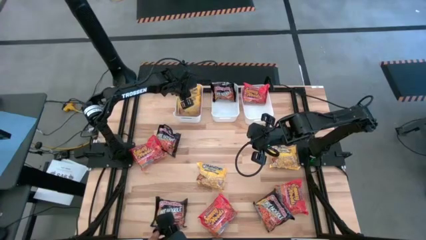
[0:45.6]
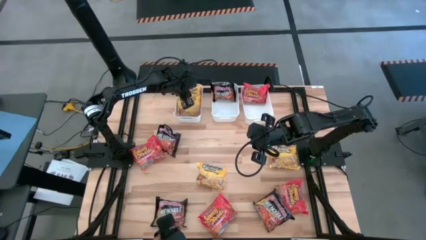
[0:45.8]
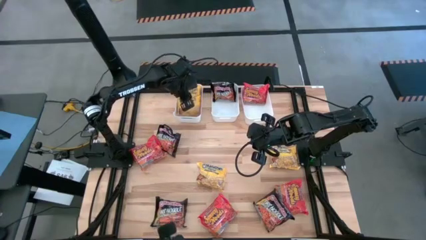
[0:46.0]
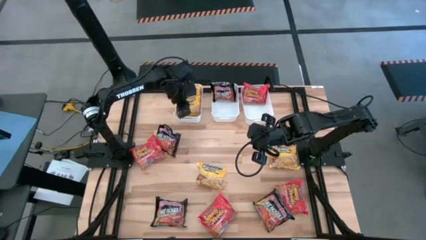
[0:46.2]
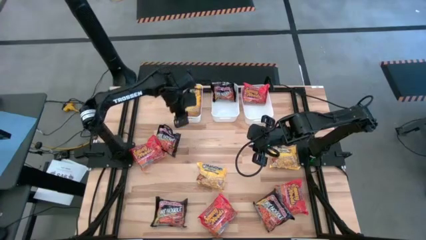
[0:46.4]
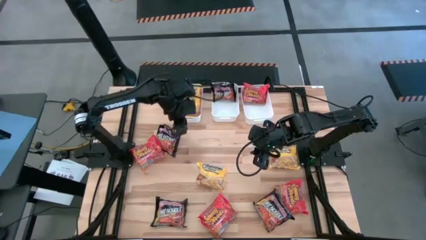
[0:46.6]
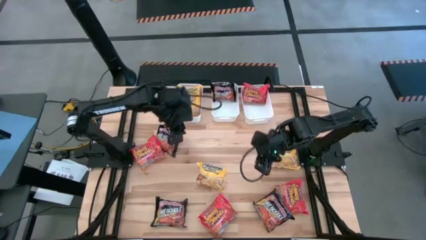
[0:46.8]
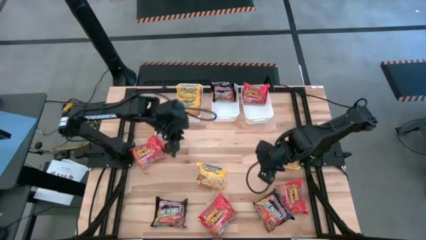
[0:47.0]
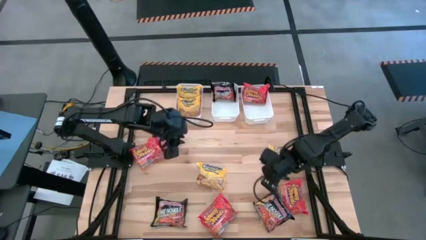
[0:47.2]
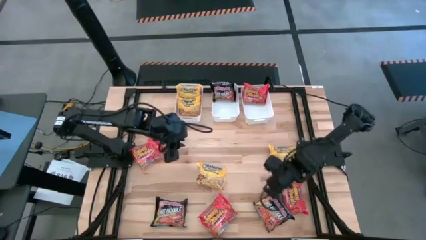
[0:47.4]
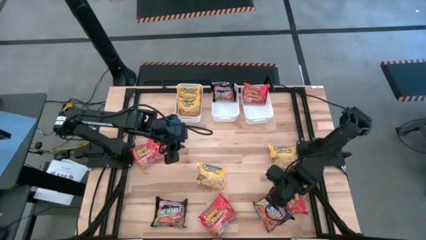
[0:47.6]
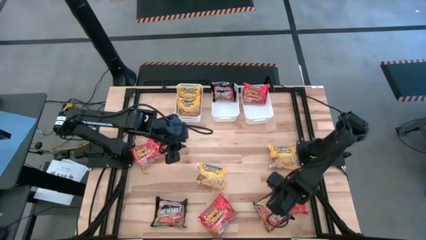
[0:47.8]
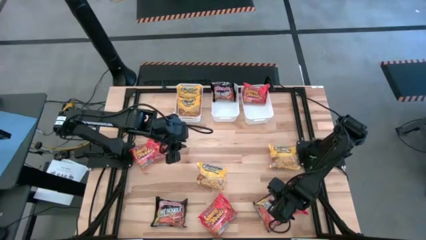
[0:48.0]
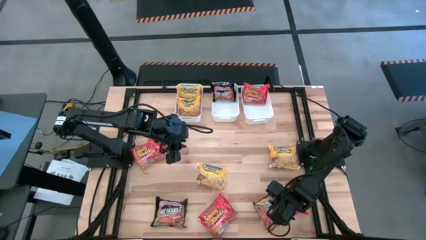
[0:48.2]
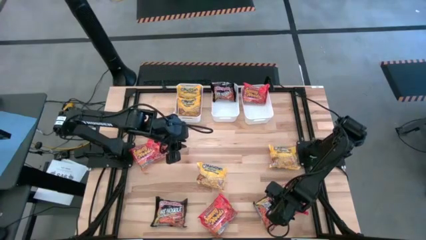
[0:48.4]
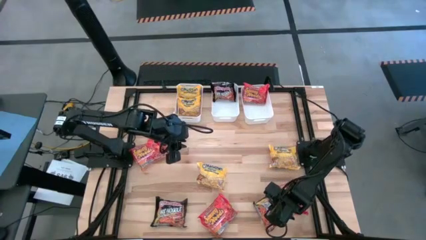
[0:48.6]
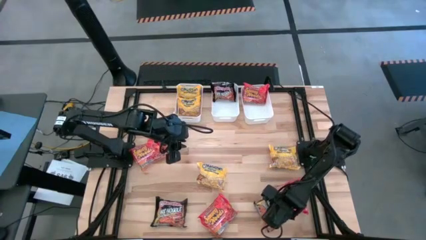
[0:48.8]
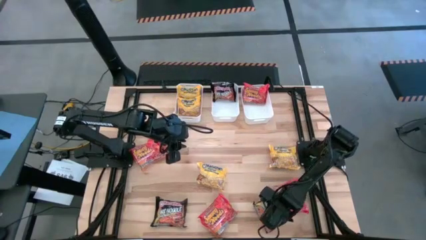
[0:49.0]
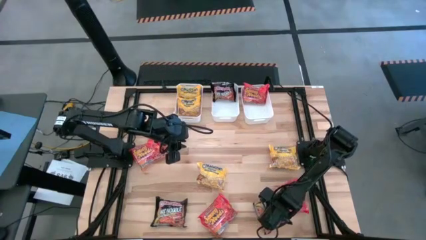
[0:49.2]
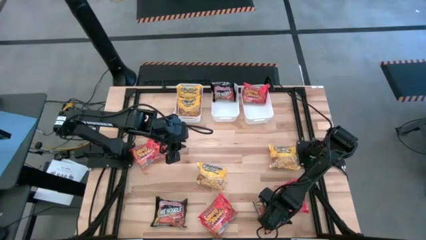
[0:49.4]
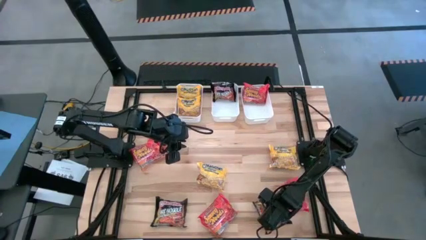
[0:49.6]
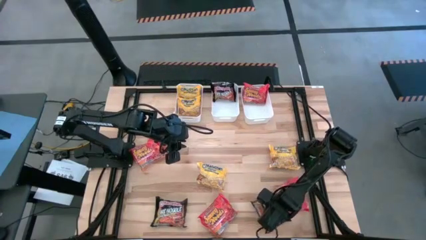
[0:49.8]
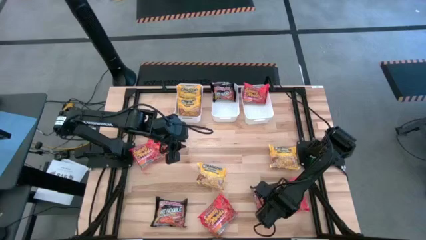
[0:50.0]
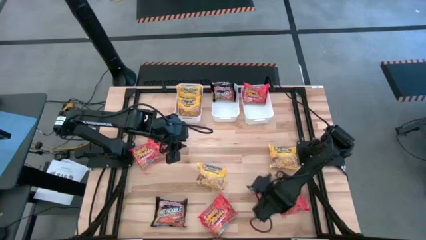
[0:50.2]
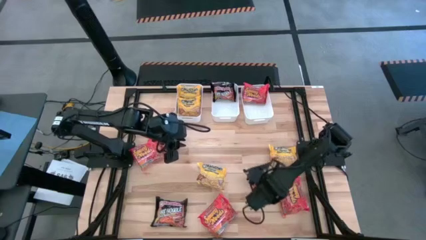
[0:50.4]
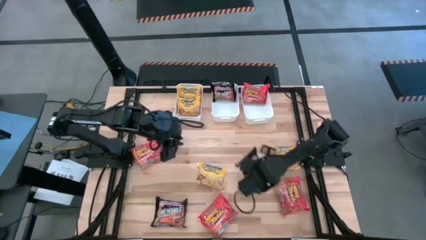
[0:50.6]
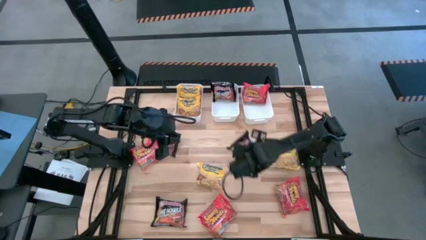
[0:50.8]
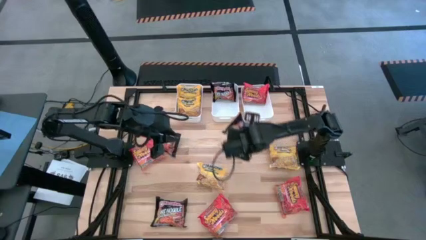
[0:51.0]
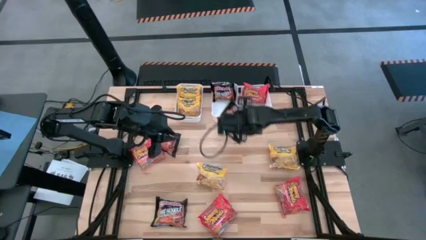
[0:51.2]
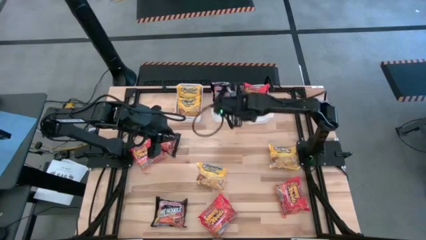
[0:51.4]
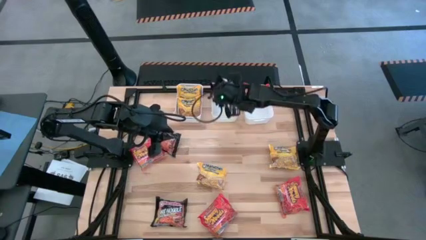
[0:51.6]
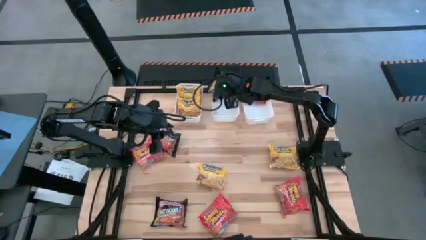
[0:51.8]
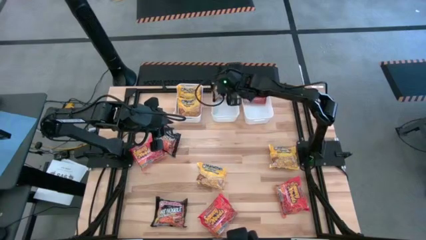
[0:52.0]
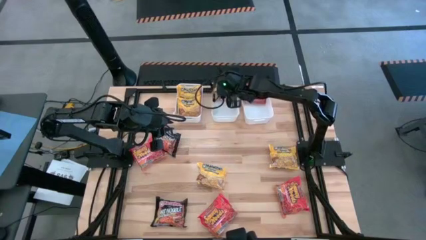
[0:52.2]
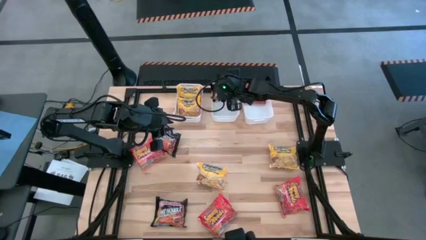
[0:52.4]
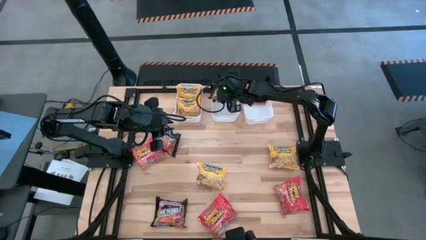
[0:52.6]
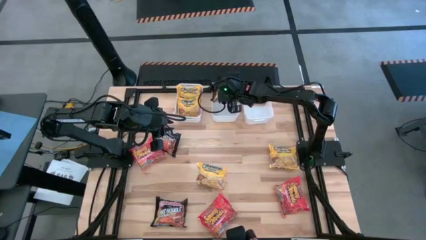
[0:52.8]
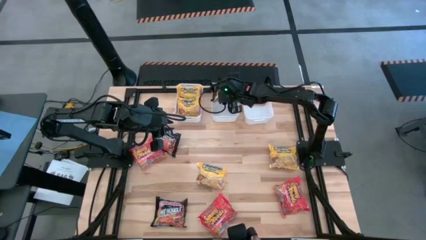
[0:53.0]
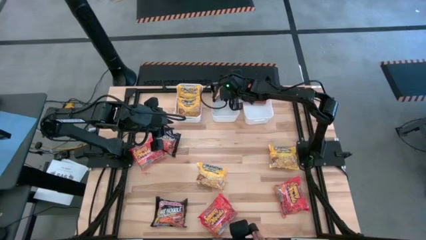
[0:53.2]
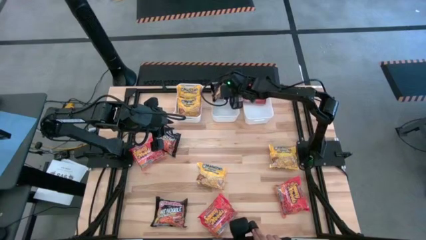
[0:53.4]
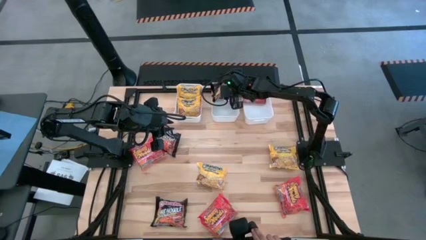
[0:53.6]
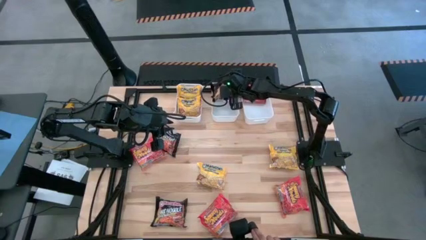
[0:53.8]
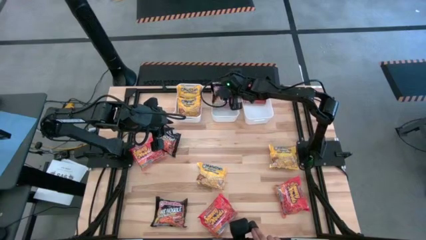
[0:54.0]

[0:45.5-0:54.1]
Task: Sort Maruchan noodles
Put the black noodle pack into the middle white bin

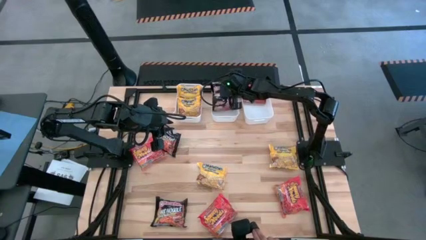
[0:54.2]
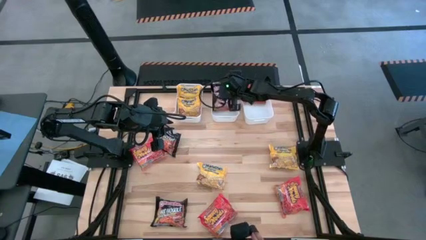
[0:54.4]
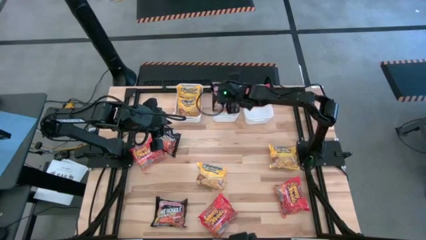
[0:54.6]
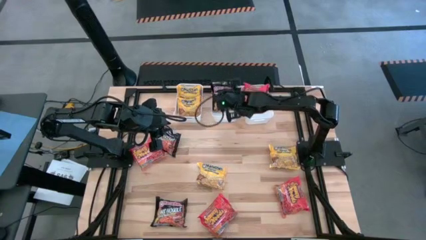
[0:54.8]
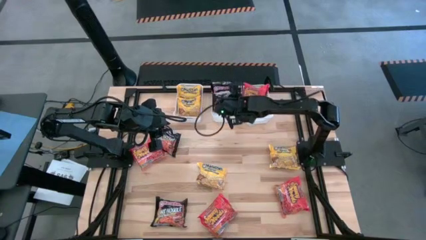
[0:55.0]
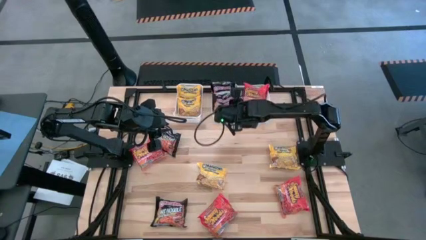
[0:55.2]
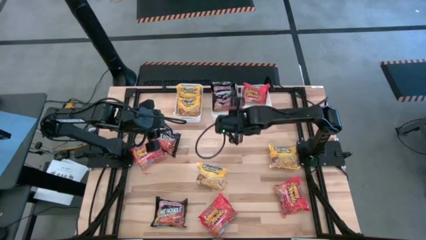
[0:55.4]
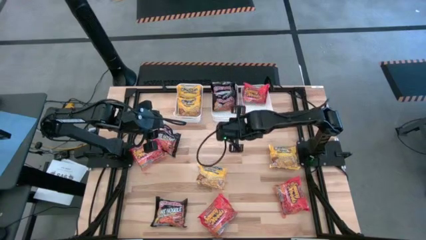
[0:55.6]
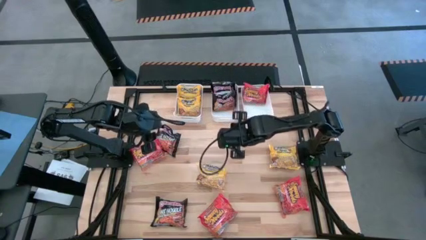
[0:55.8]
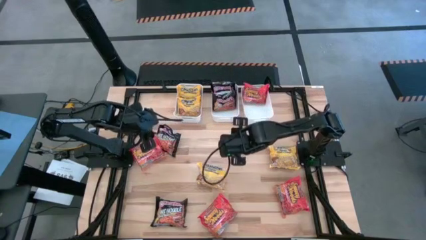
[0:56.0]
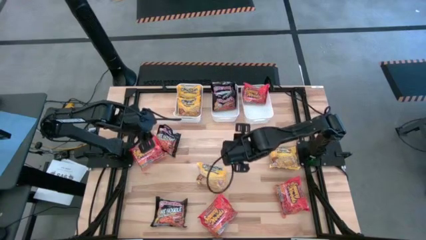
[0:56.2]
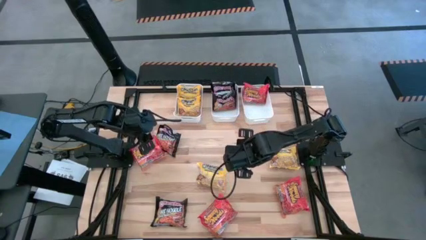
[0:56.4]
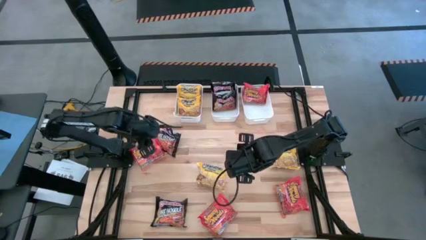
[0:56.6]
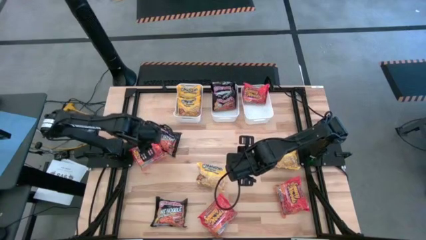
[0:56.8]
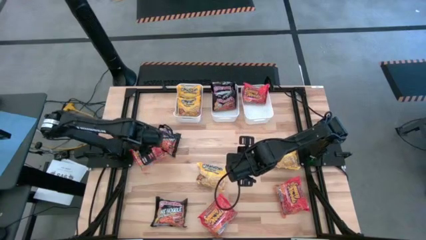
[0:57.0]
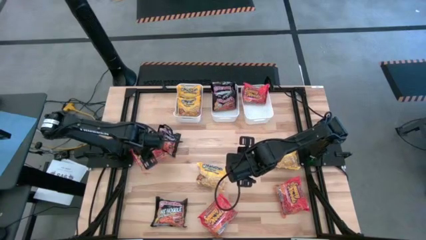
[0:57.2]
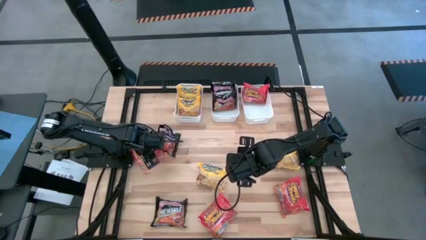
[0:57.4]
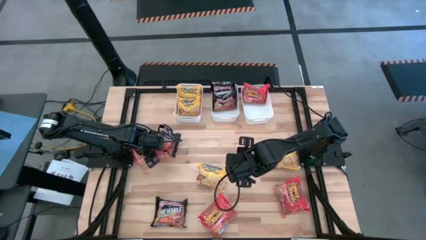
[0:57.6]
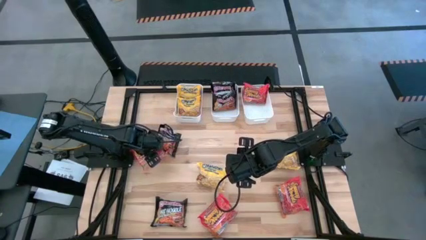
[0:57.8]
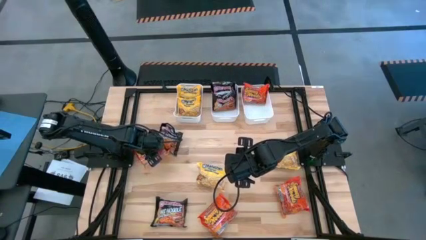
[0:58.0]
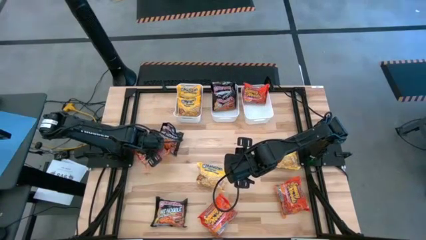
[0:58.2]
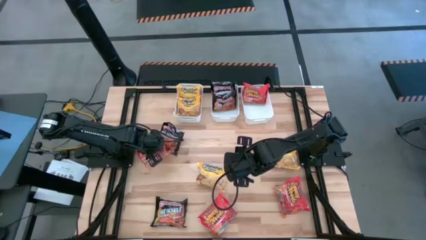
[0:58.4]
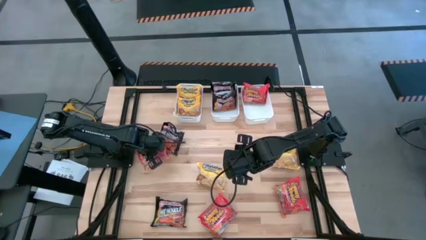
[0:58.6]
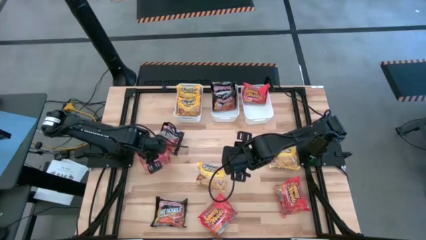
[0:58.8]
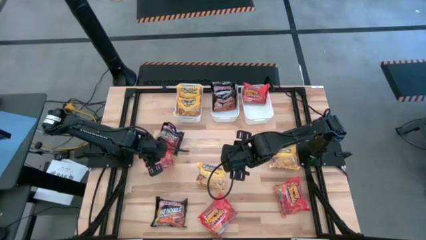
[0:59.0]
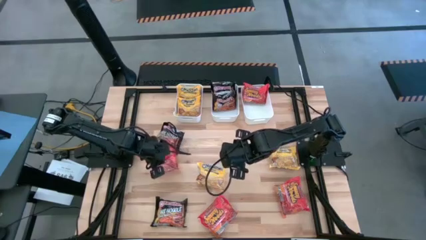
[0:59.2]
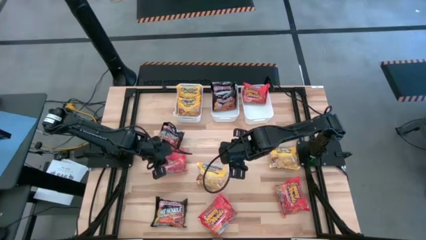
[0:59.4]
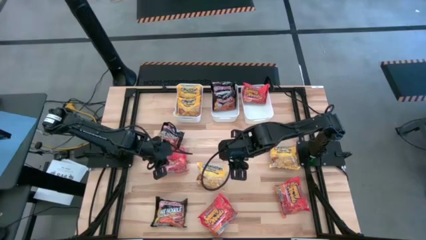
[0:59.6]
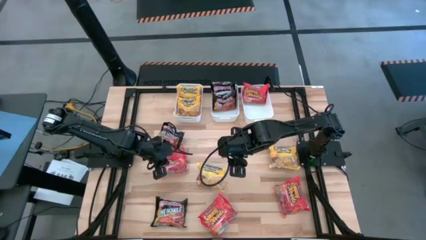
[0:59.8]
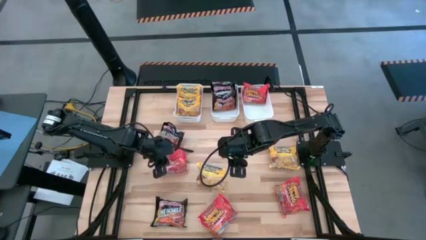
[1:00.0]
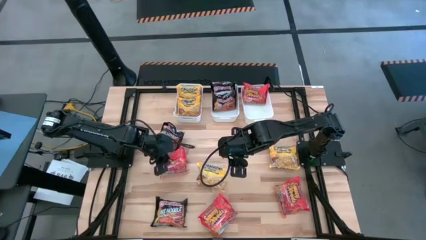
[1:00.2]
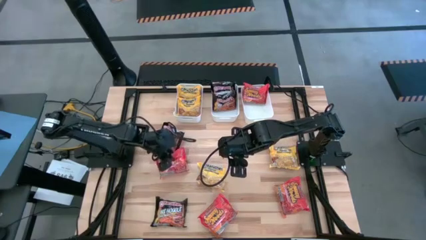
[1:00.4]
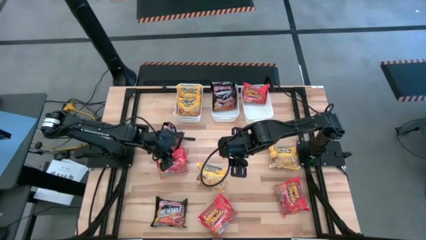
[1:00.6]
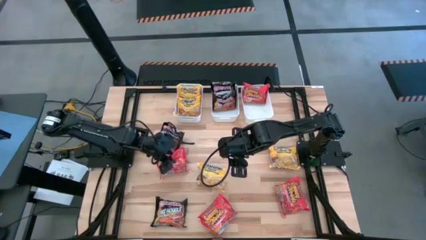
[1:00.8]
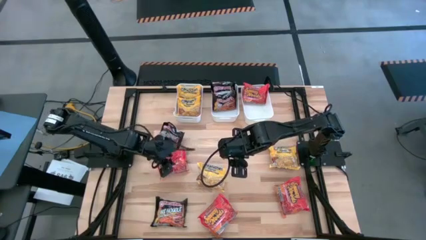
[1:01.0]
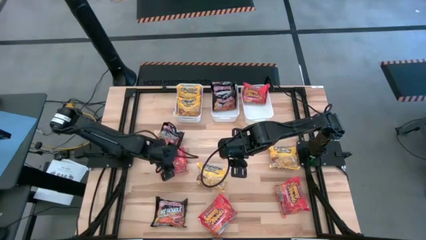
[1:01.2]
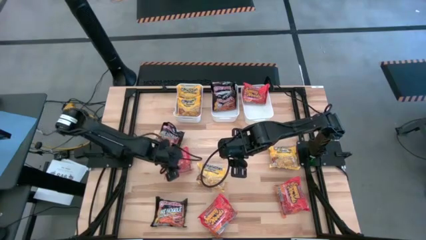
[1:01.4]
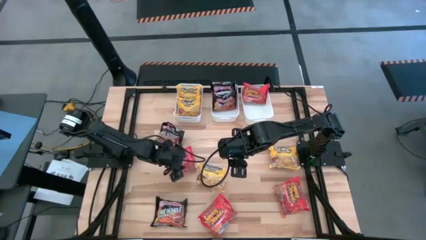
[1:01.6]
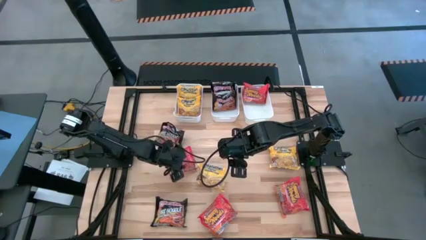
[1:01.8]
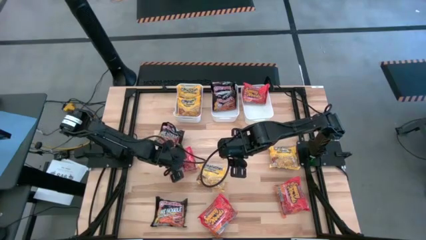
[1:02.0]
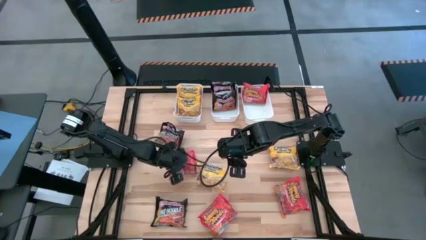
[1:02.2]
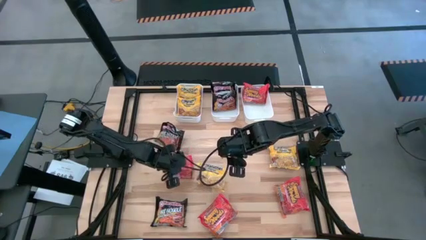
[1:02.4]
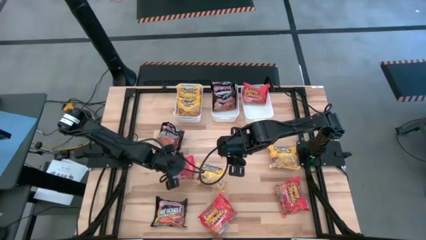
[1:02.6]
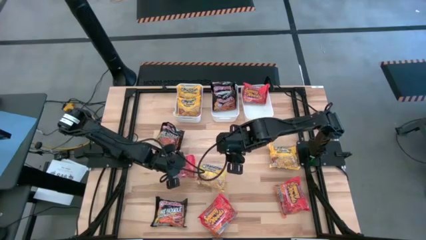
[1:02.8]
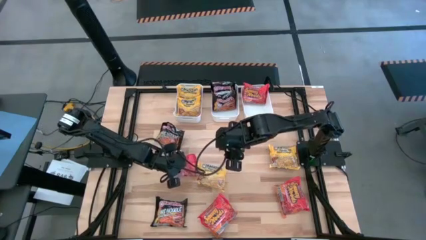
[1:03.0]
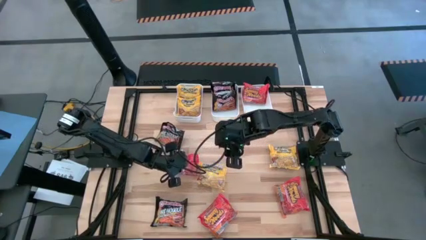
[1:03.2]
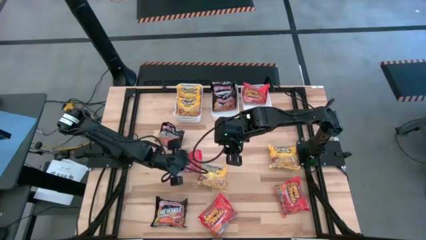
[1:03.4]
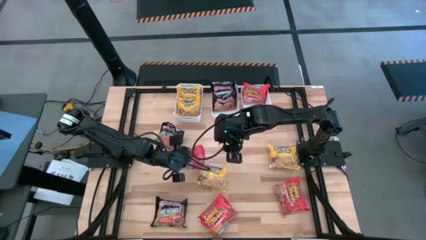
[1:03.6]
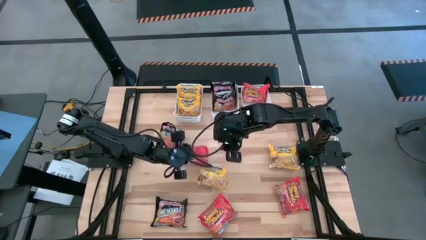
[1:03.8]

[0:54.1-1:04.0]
Put the orange noodle pack into the right white bin
